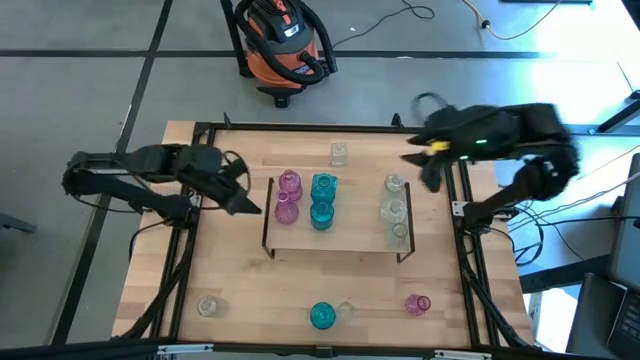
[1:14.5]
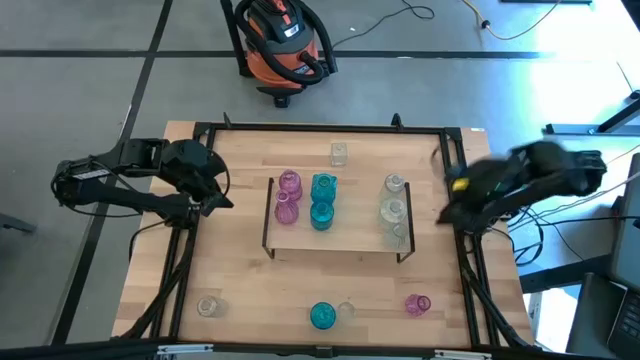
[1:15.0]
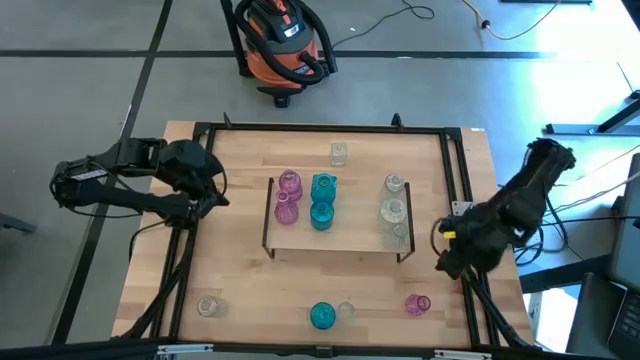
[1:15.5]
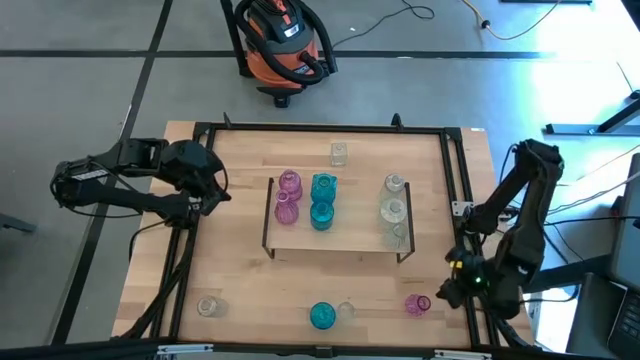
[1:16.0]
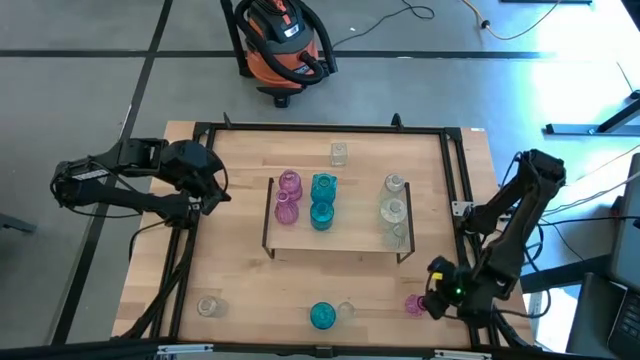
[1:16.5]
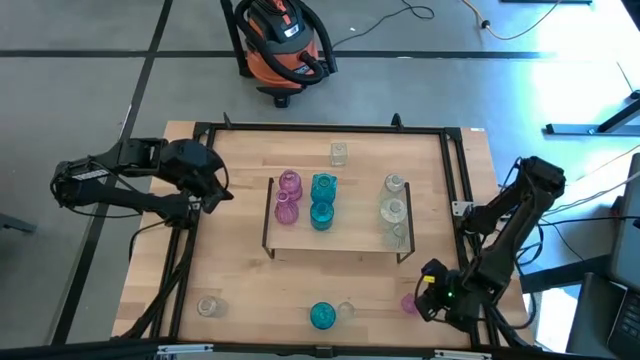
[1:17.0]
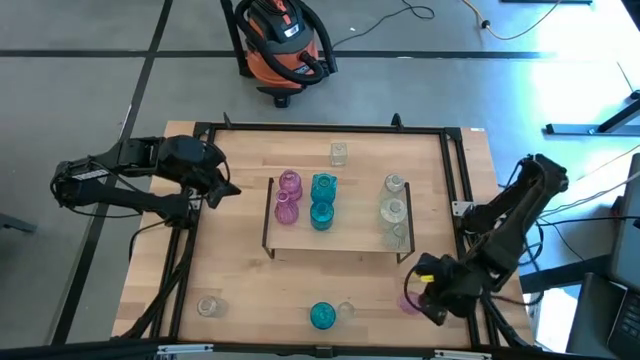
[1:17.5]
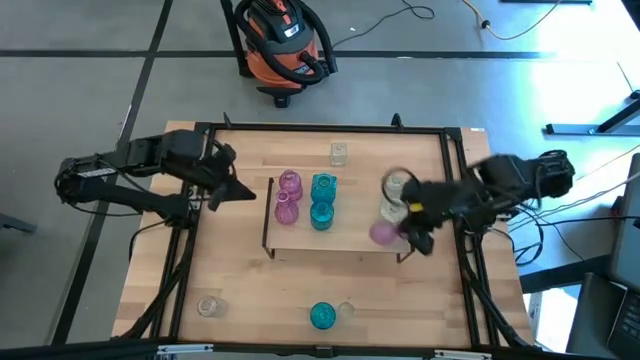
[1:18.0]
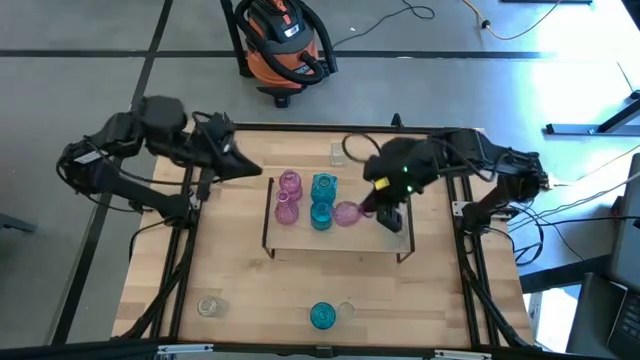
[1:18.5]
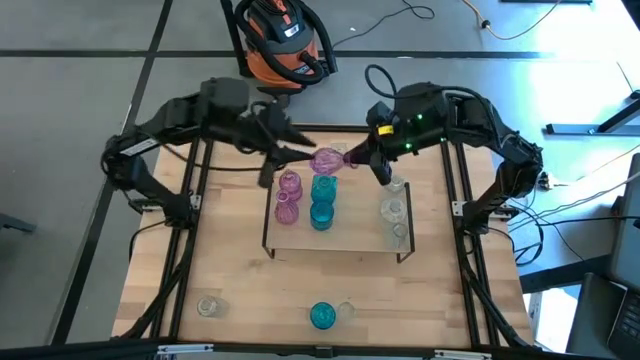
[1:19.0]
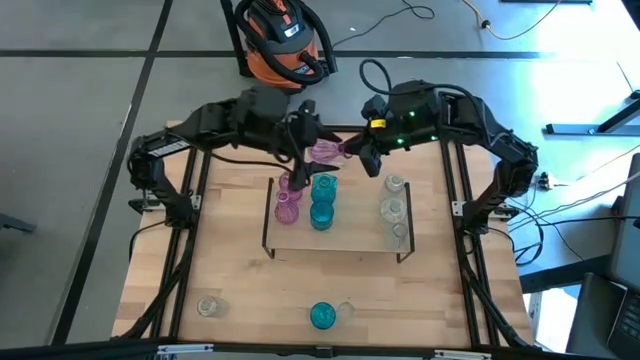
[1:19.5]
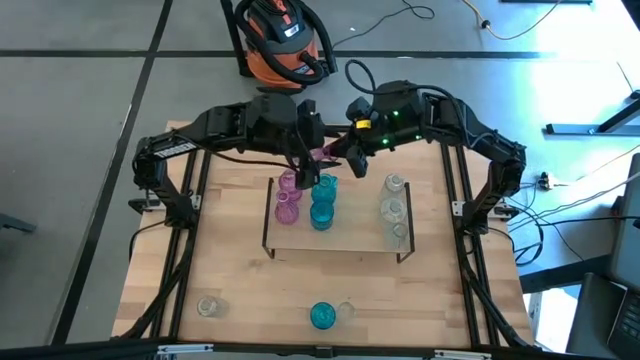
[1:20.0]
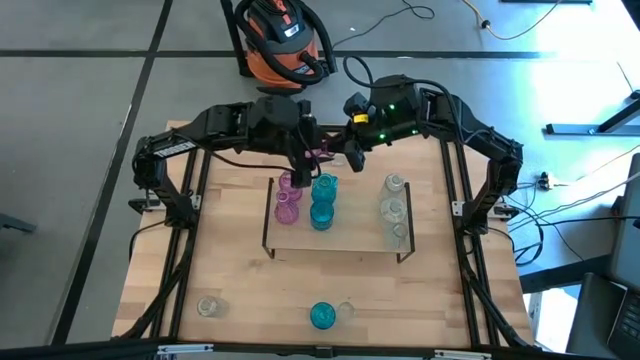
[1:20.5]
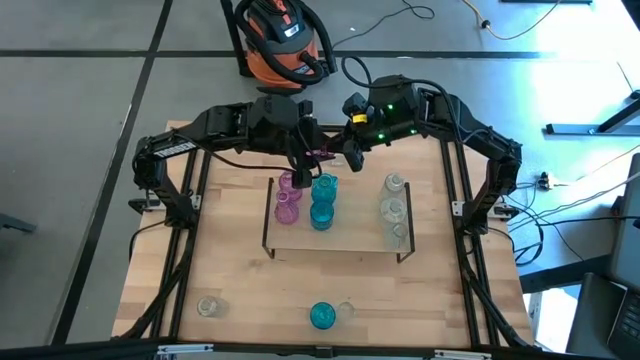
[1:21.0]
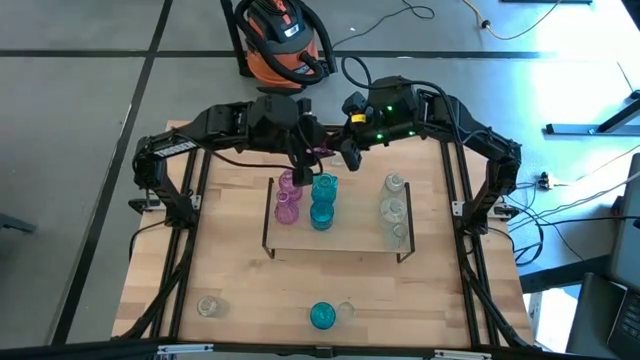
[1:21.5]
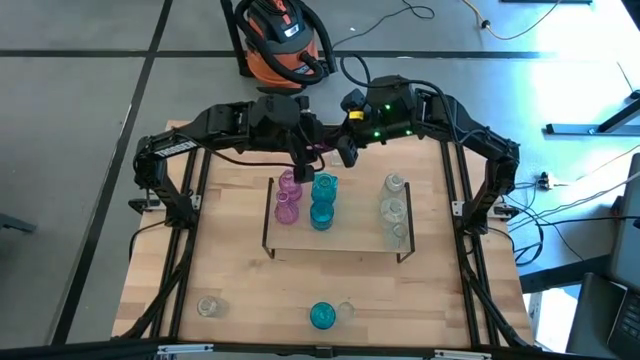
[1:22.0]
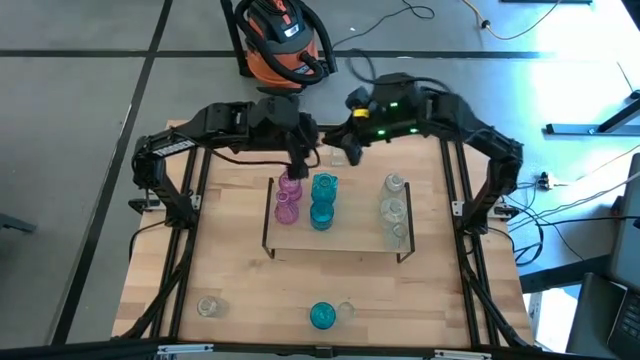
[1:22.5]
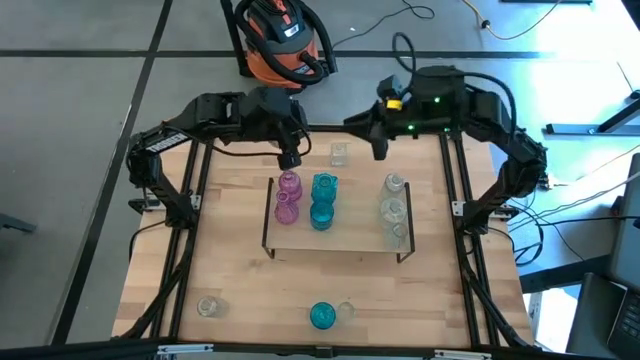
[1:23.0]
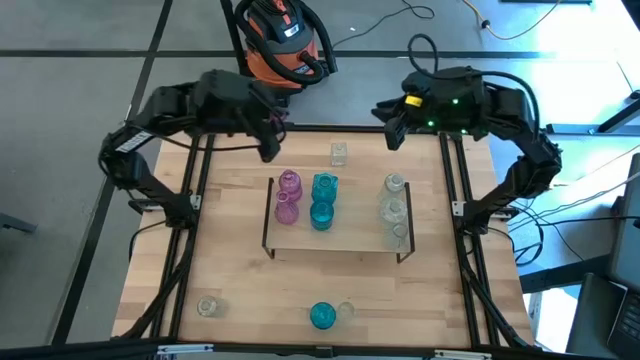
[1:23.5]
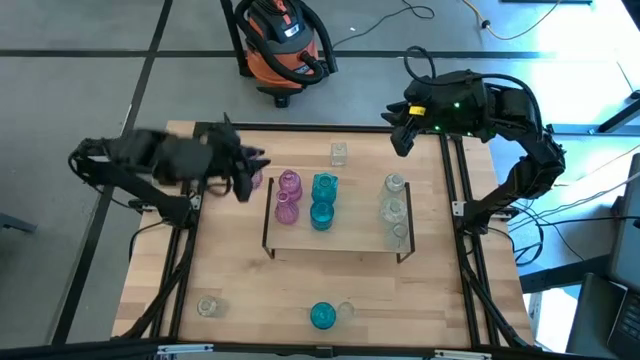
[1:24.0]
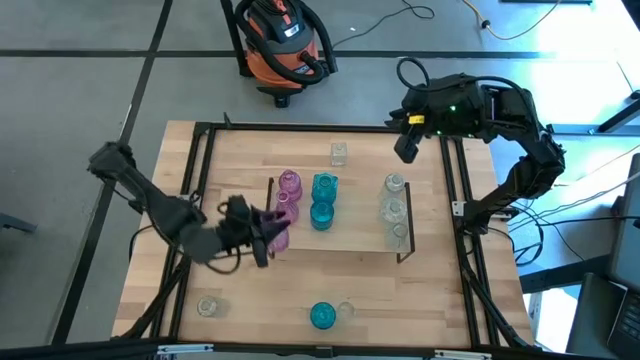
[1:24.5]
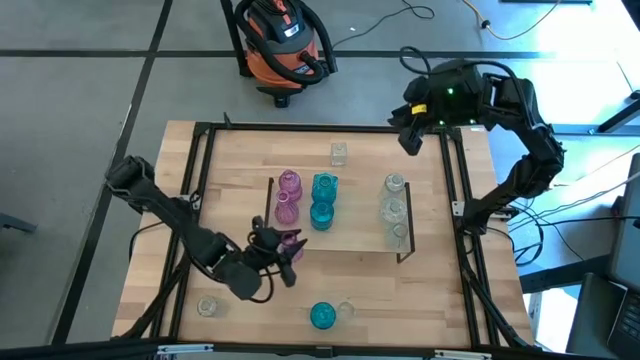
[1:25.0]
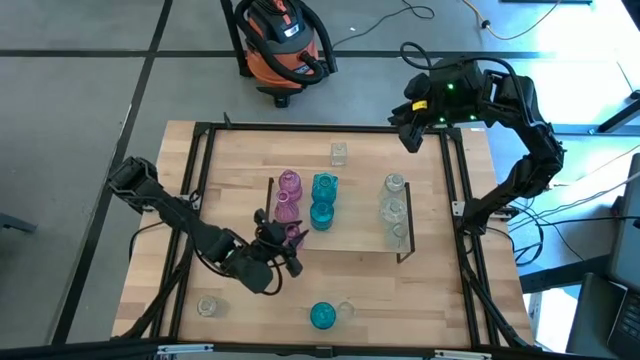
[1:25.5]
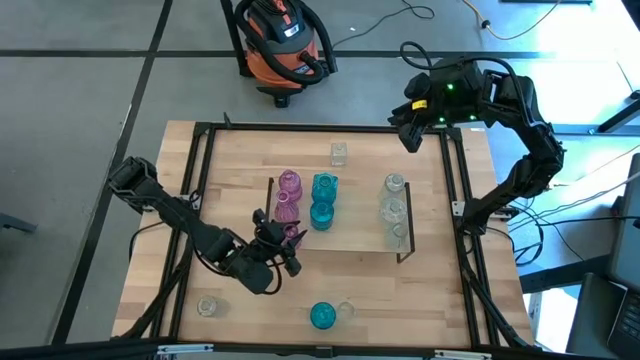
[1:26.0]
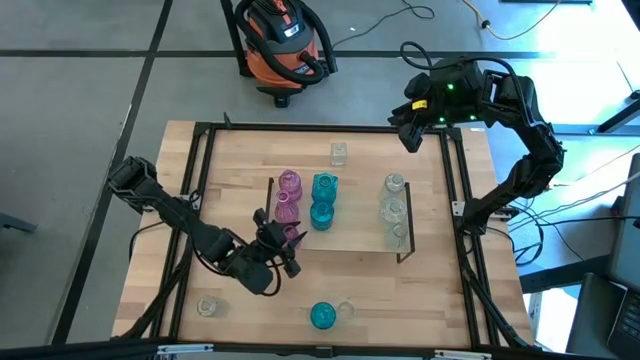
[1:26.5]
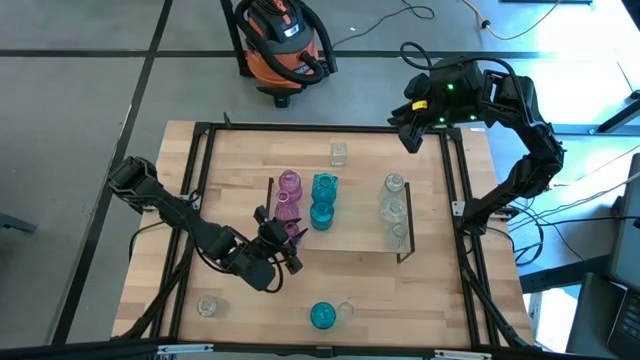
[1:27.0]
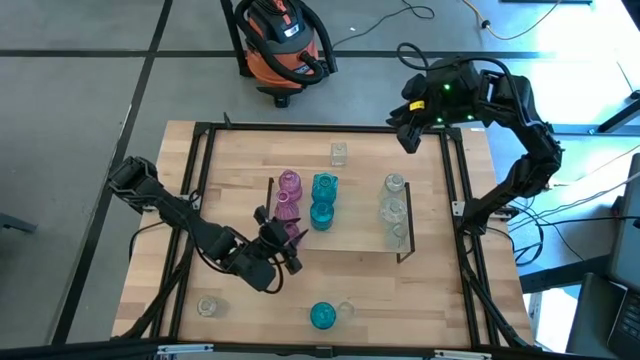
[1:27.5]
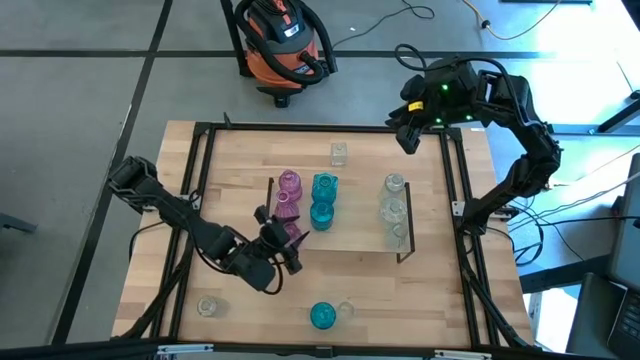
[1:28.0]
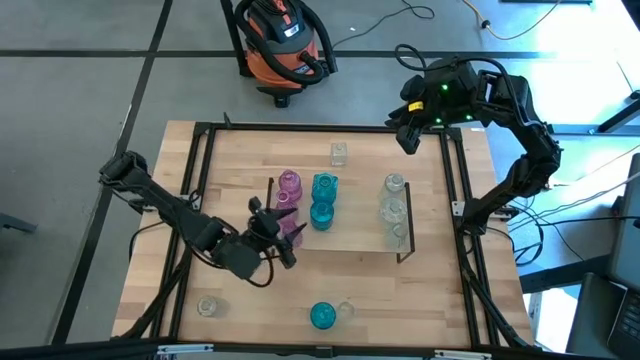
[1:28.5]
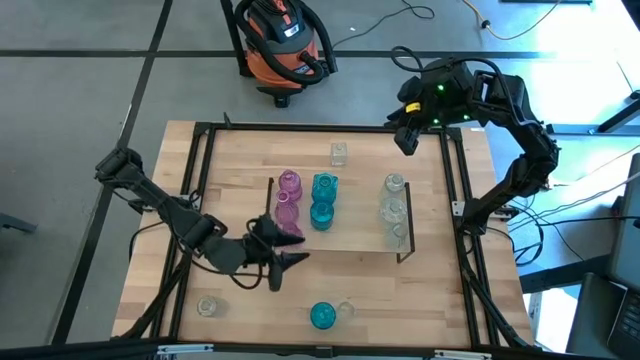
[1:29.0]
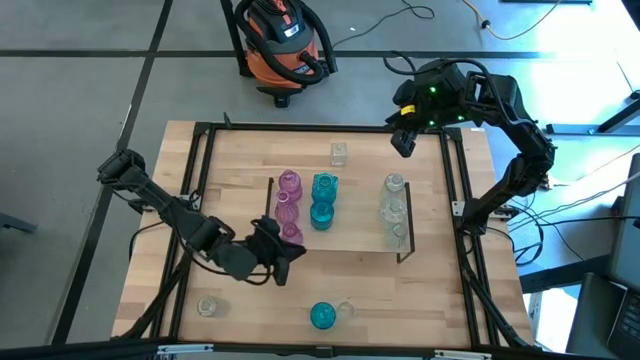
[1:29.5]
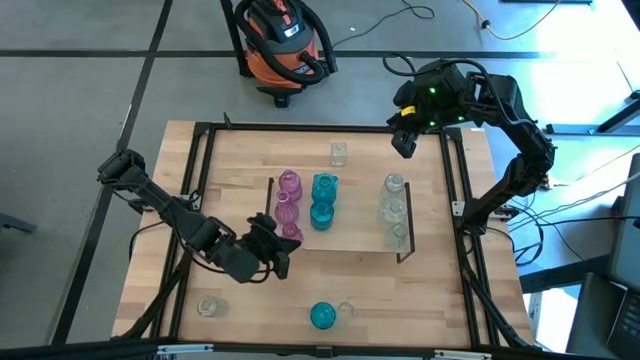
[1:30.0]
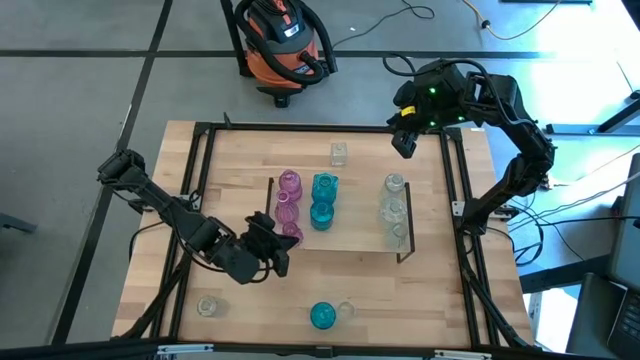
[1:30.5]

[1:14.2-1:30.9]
Task: sort vases onto shelf
Put the violet vase on the shelf aligned with the other violet vase

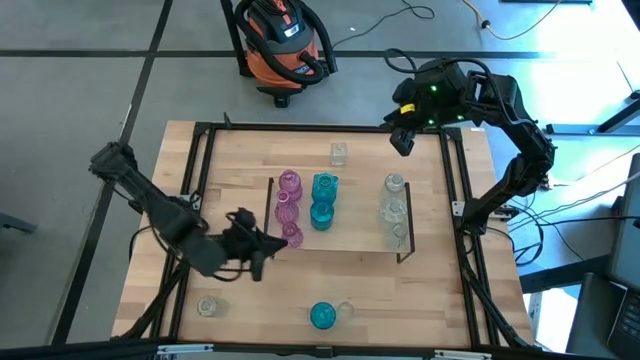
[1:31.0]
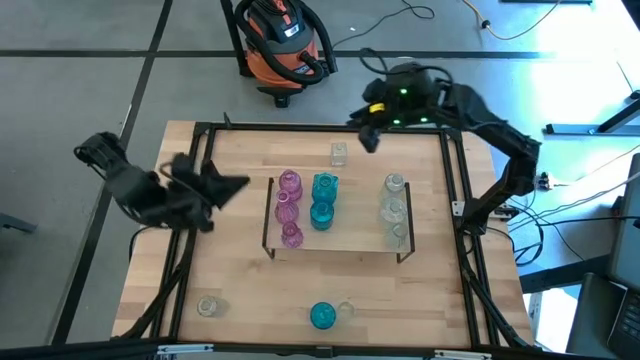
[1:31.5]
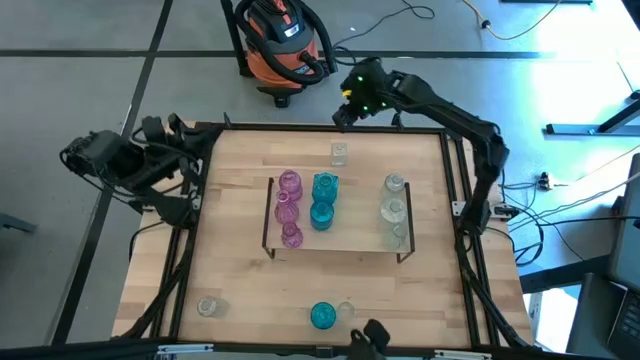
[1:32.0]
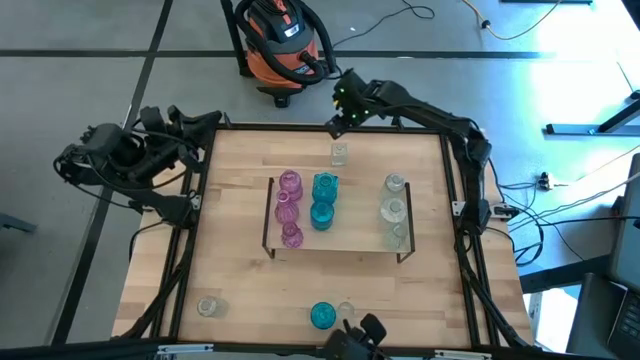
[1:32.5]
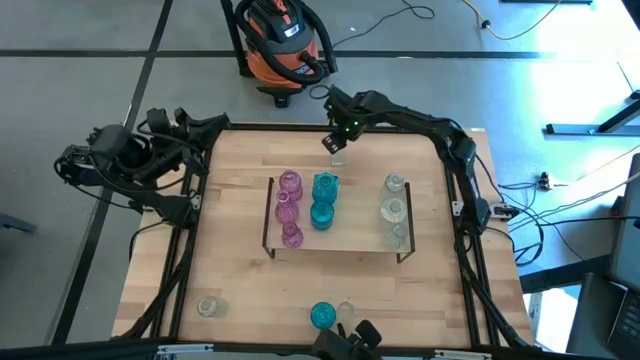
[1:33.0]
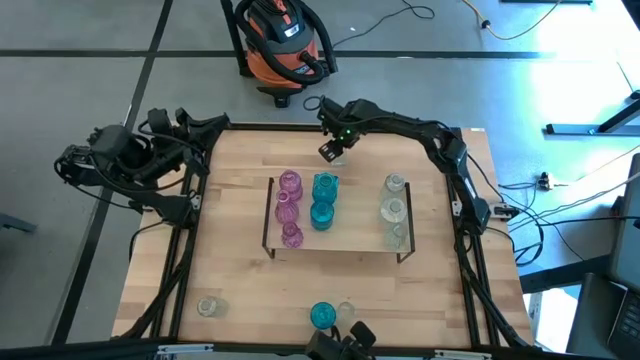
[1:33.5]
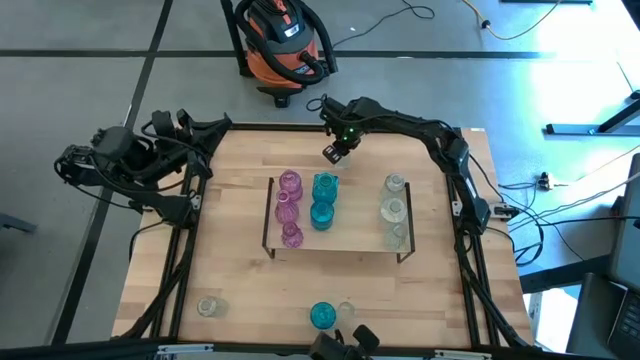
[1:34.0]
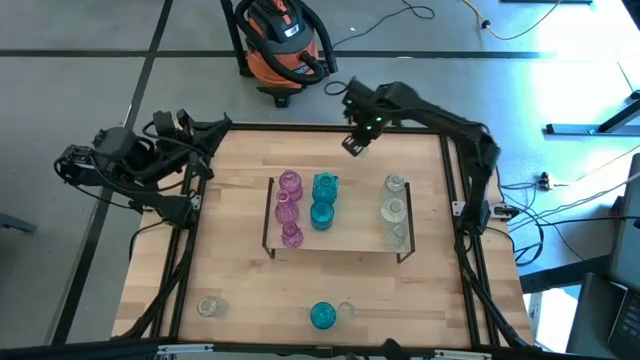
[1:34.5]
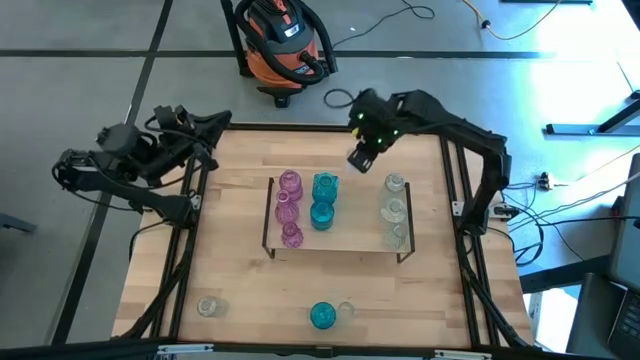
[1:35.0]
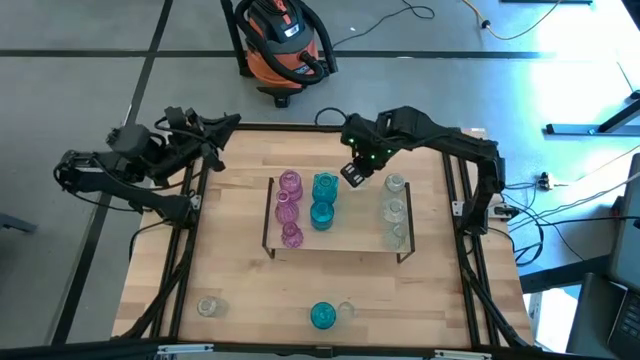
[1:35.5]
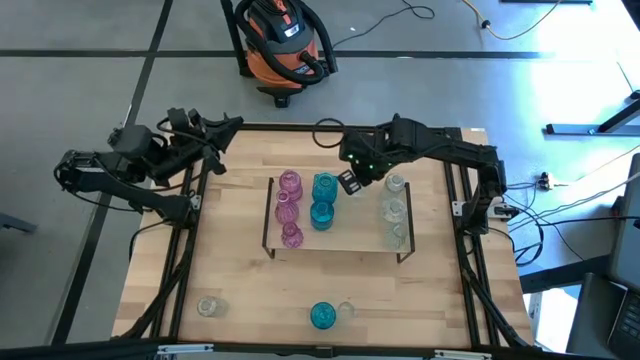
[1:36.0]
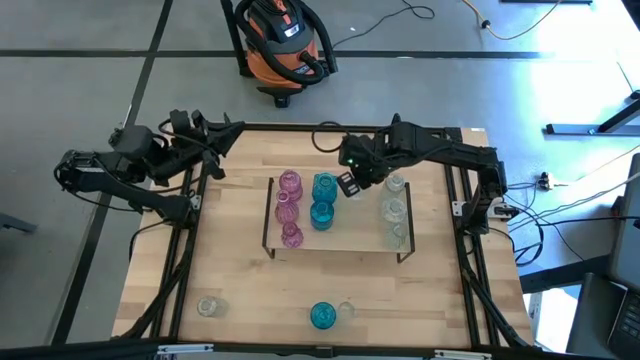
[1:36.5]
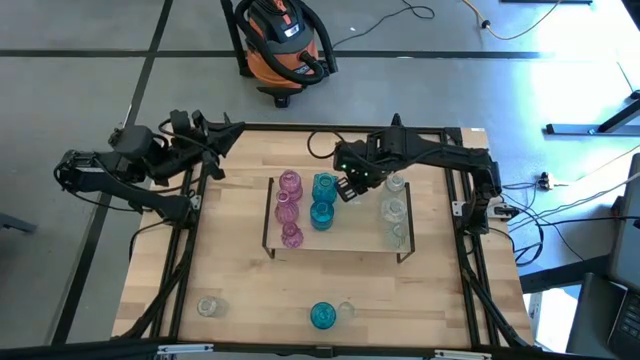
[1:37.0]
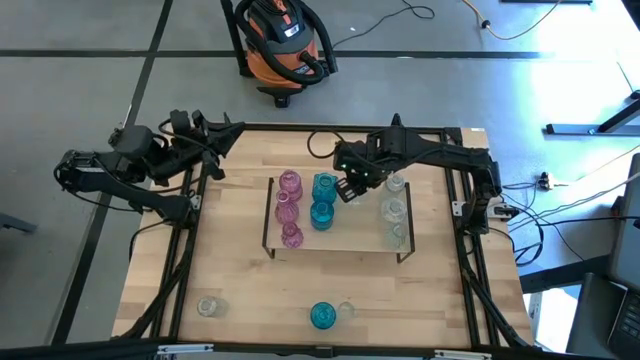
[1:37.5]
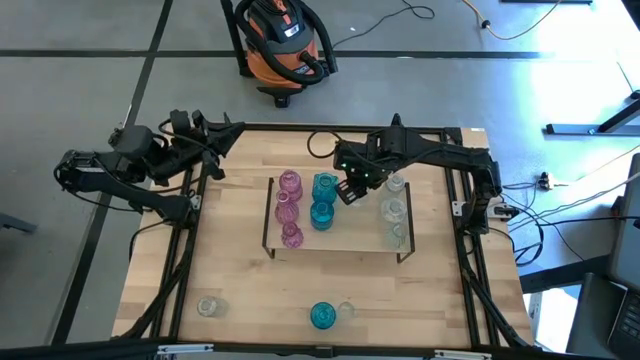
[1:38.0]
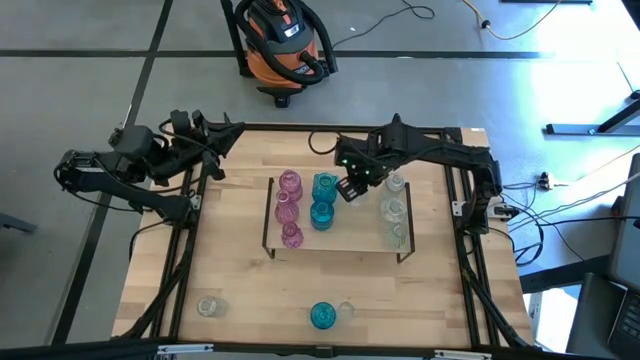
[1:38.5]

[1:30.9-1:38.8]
Put the transparent vase on the shelf
